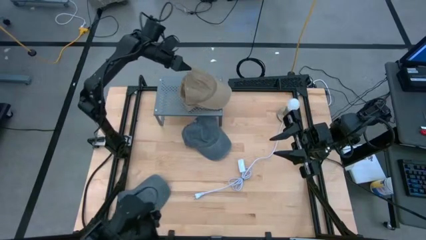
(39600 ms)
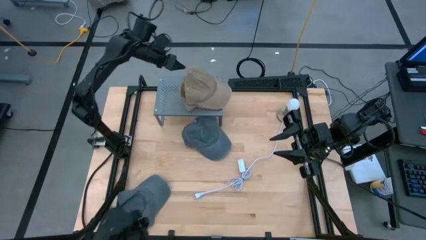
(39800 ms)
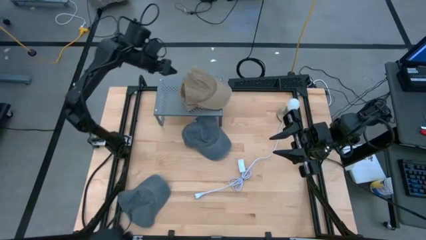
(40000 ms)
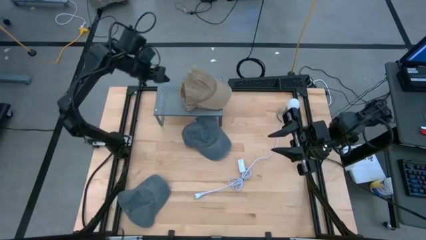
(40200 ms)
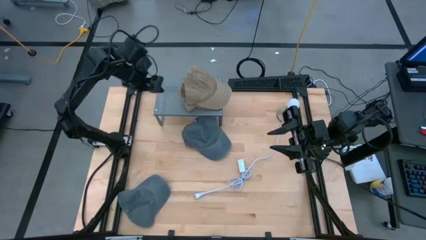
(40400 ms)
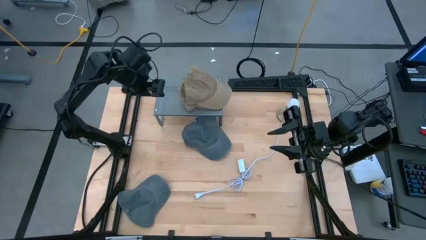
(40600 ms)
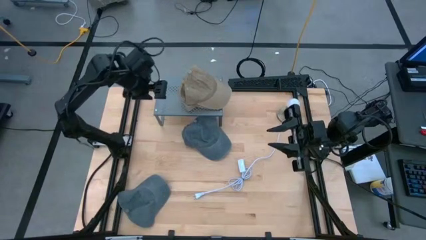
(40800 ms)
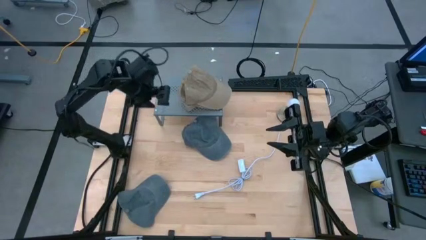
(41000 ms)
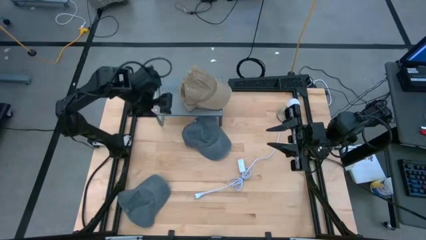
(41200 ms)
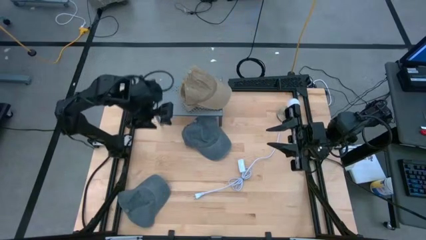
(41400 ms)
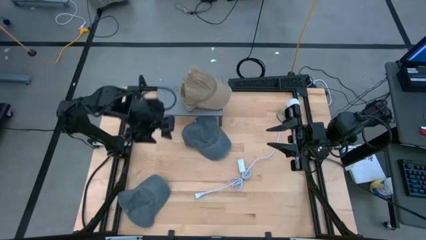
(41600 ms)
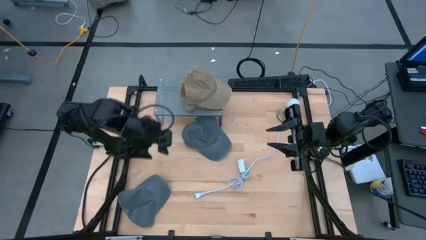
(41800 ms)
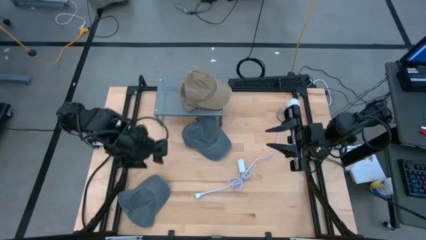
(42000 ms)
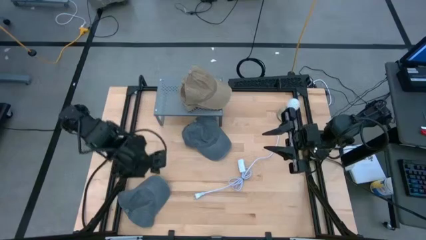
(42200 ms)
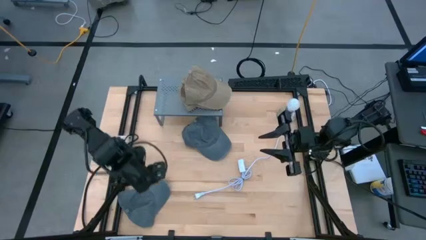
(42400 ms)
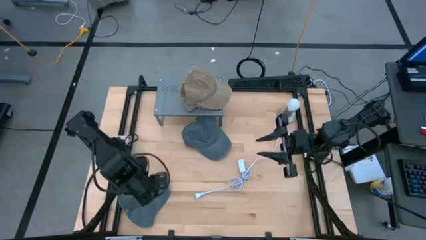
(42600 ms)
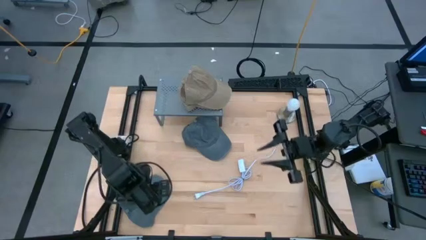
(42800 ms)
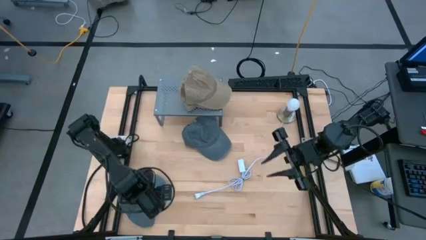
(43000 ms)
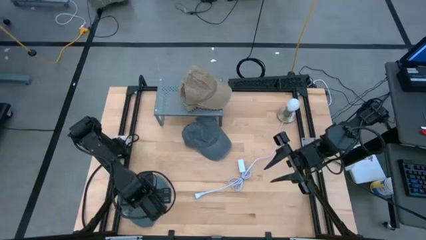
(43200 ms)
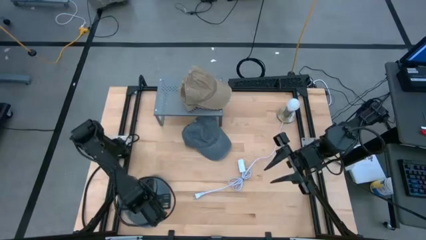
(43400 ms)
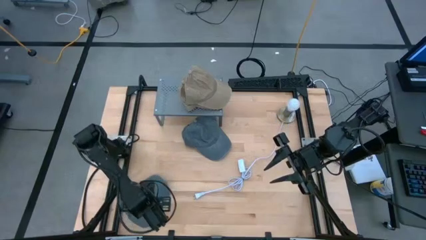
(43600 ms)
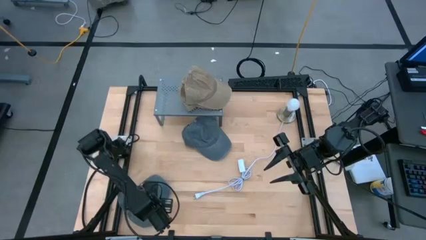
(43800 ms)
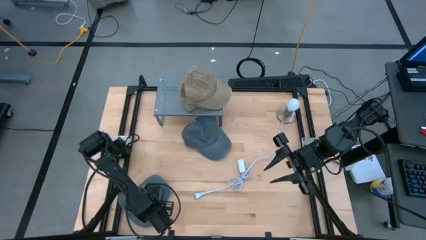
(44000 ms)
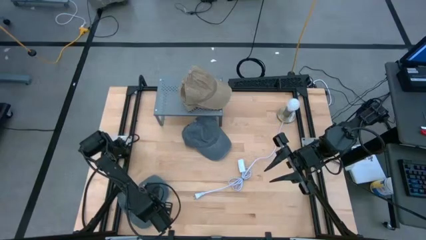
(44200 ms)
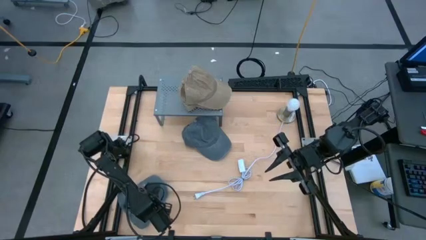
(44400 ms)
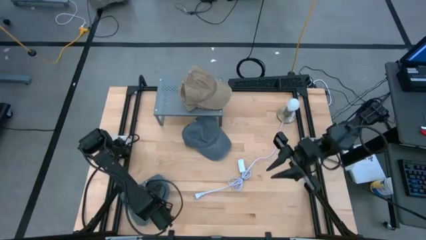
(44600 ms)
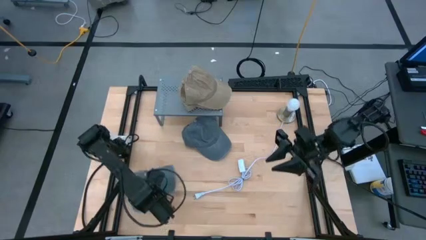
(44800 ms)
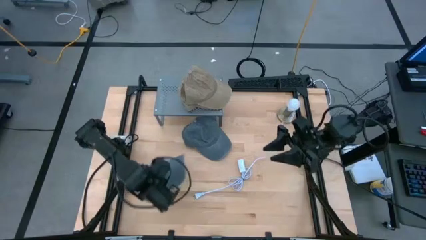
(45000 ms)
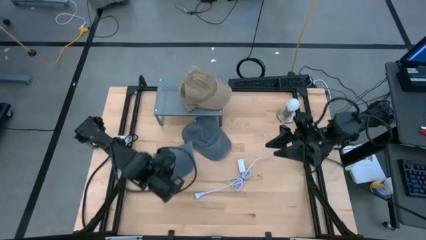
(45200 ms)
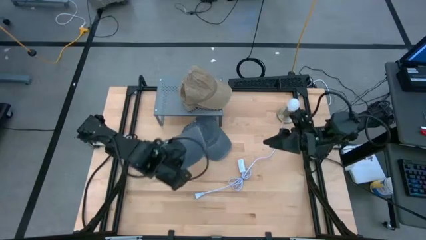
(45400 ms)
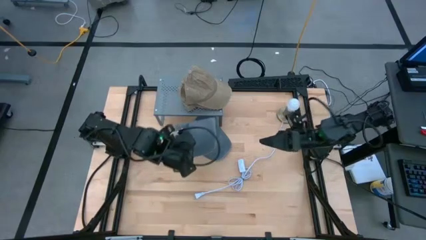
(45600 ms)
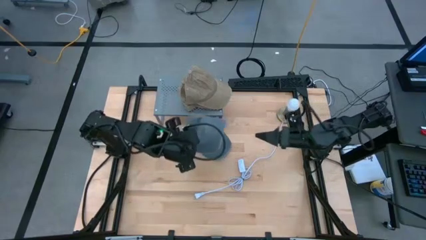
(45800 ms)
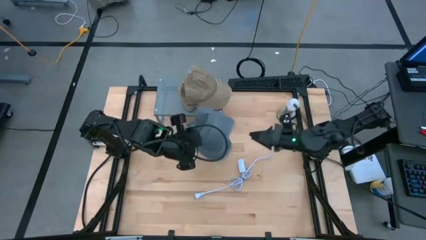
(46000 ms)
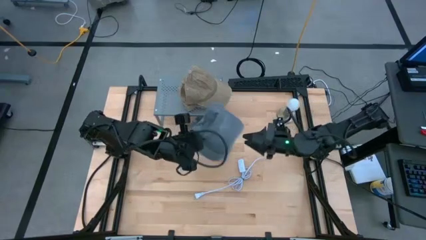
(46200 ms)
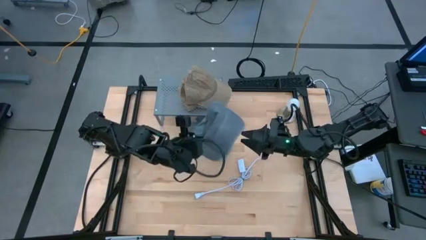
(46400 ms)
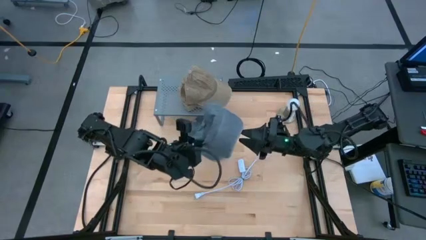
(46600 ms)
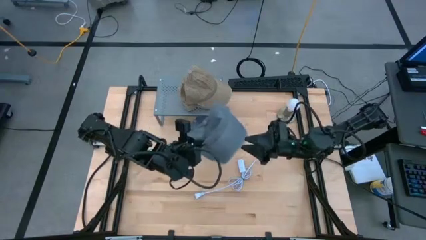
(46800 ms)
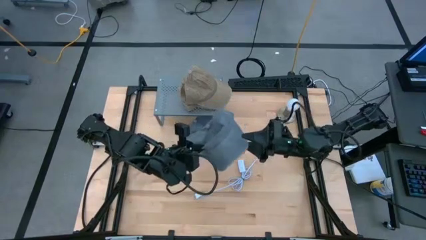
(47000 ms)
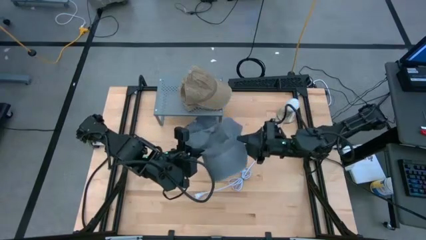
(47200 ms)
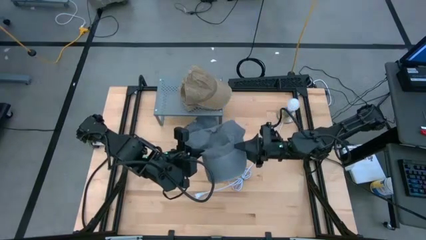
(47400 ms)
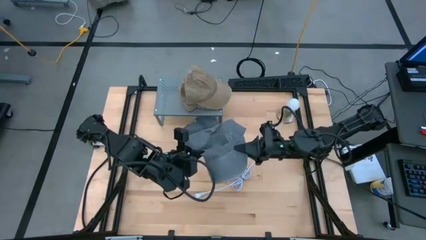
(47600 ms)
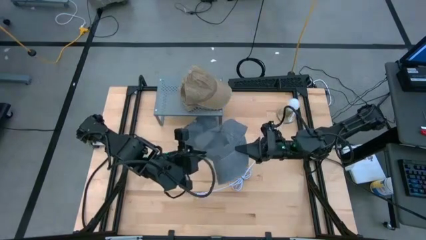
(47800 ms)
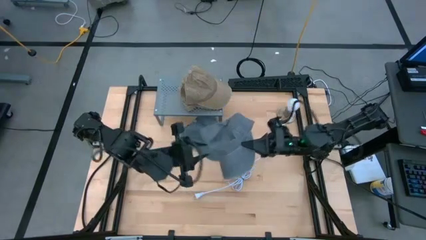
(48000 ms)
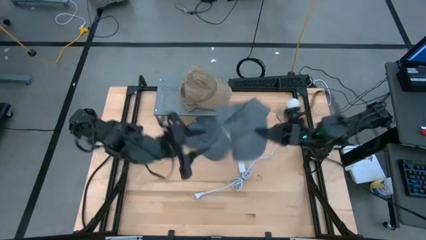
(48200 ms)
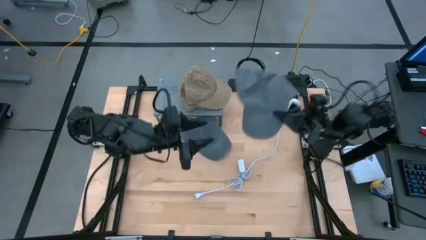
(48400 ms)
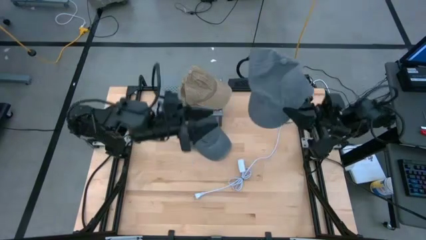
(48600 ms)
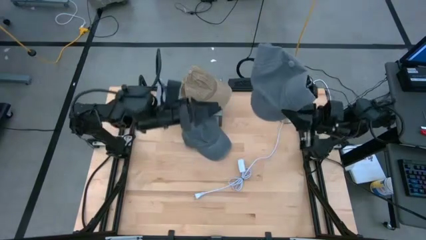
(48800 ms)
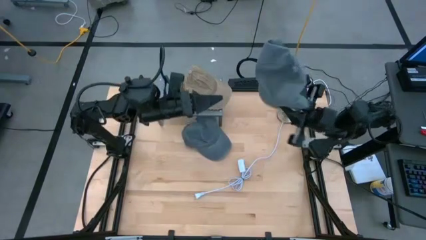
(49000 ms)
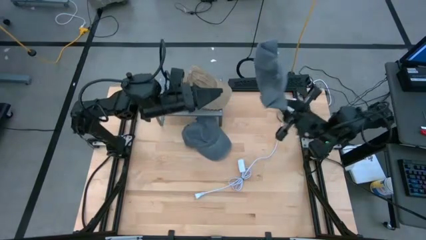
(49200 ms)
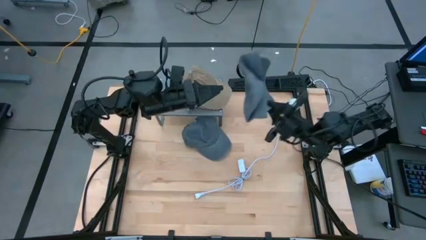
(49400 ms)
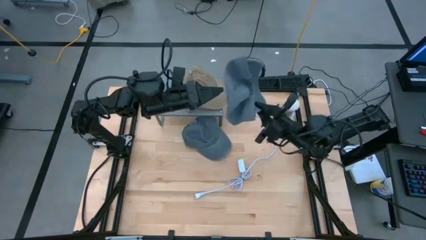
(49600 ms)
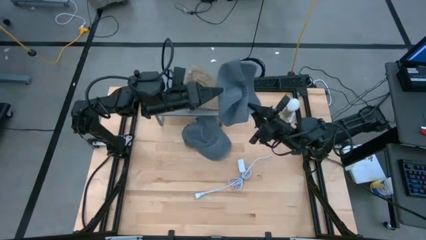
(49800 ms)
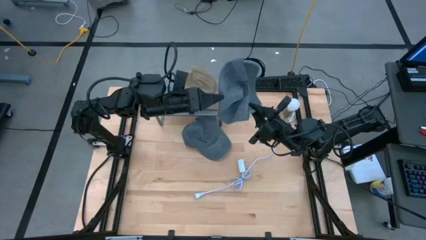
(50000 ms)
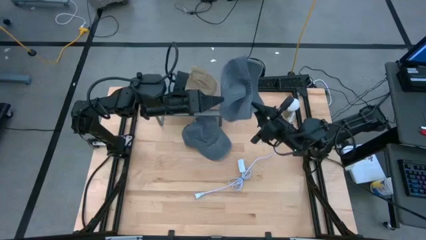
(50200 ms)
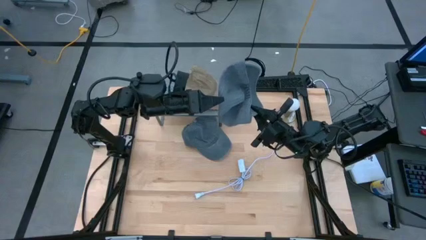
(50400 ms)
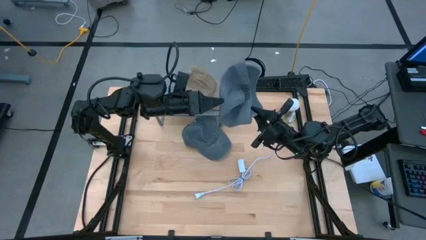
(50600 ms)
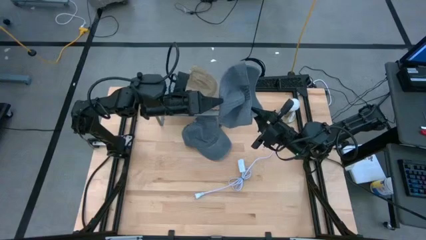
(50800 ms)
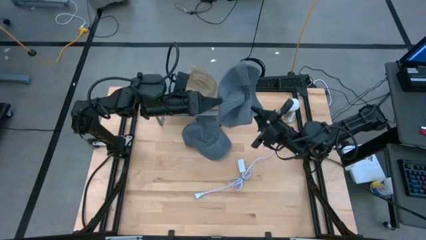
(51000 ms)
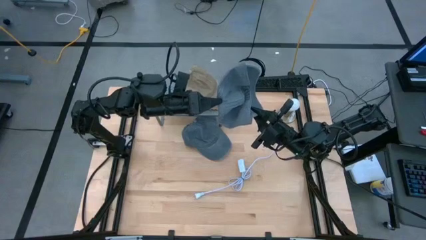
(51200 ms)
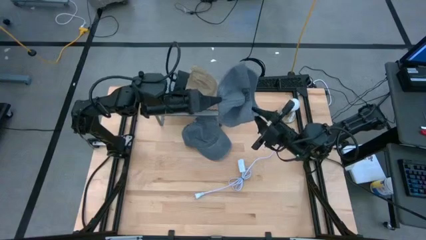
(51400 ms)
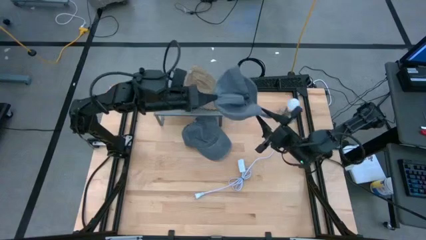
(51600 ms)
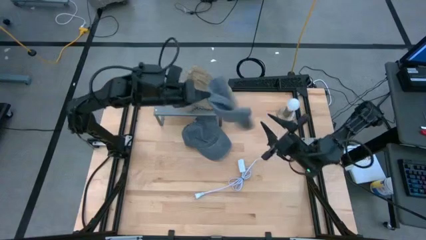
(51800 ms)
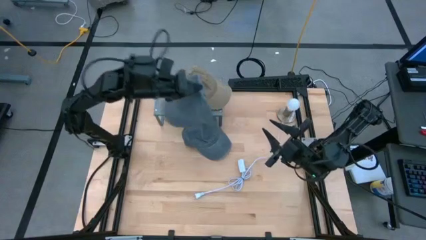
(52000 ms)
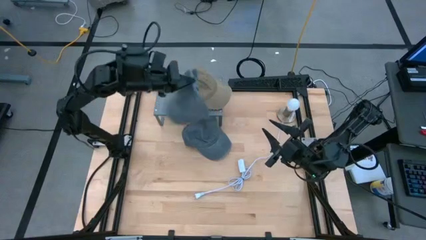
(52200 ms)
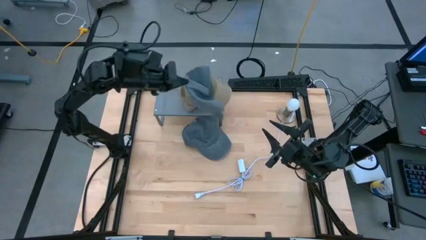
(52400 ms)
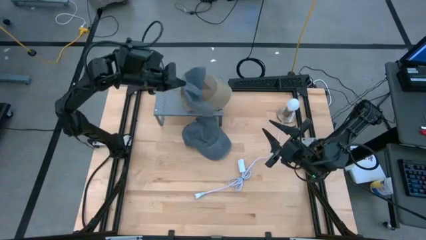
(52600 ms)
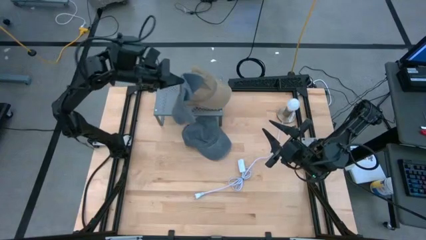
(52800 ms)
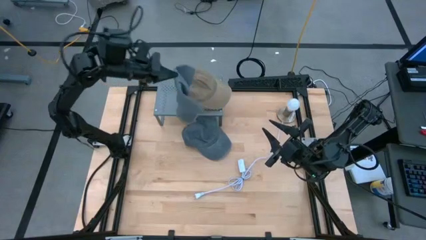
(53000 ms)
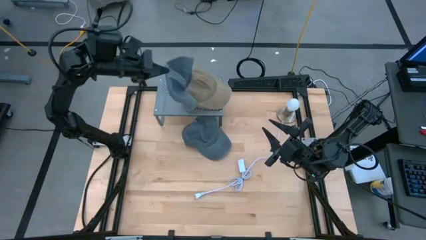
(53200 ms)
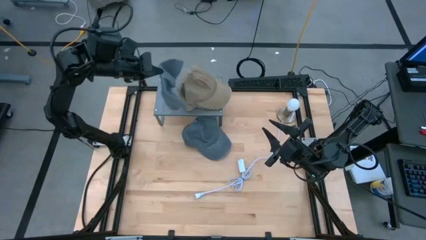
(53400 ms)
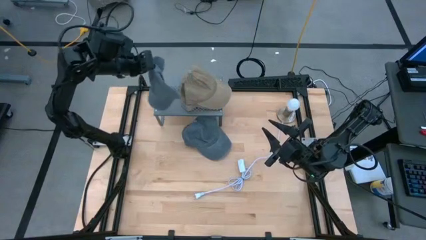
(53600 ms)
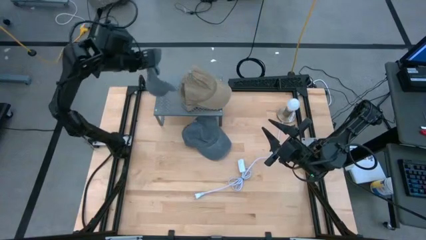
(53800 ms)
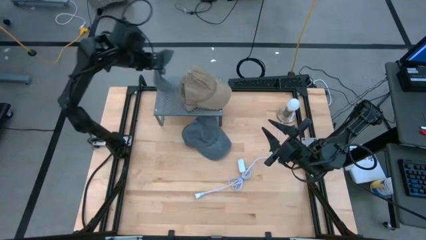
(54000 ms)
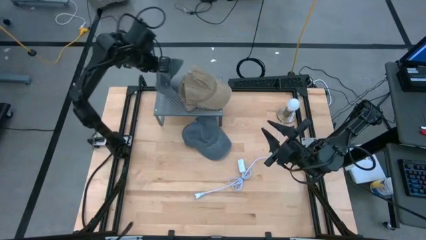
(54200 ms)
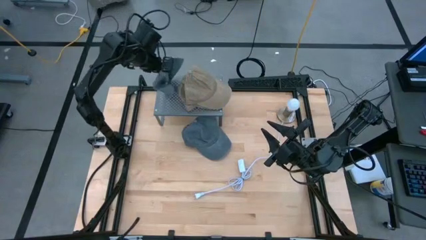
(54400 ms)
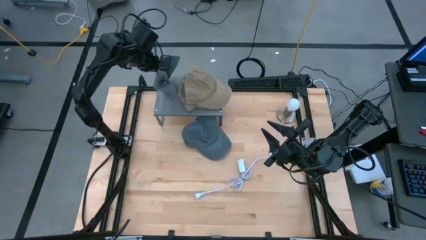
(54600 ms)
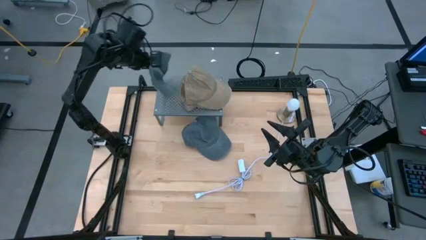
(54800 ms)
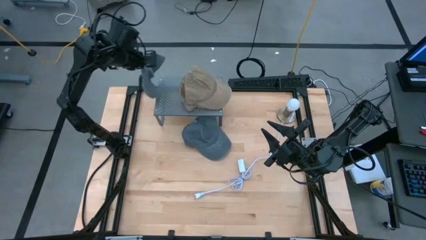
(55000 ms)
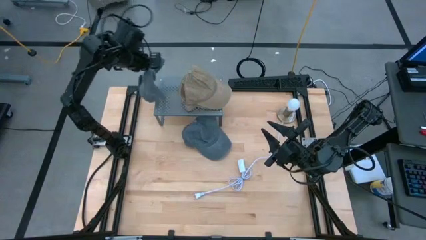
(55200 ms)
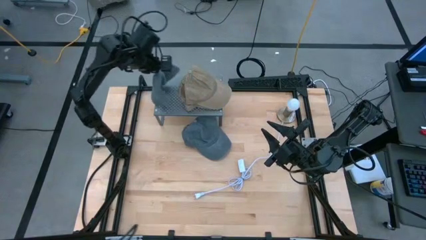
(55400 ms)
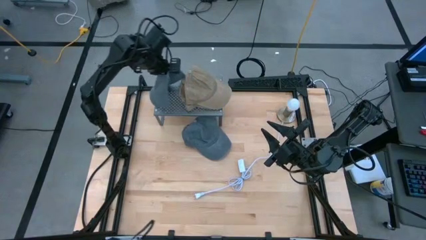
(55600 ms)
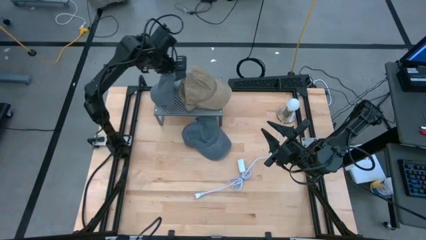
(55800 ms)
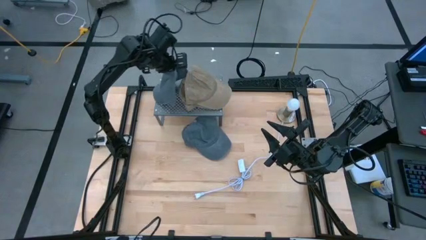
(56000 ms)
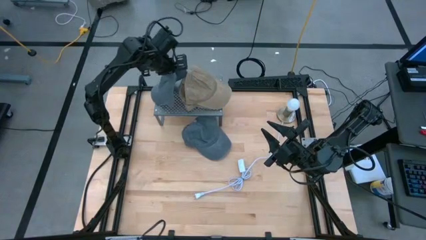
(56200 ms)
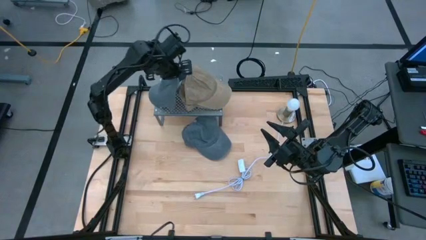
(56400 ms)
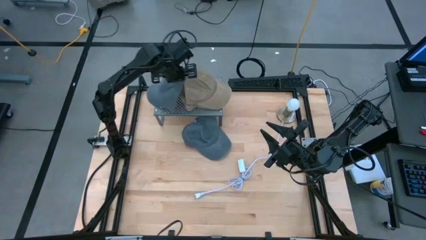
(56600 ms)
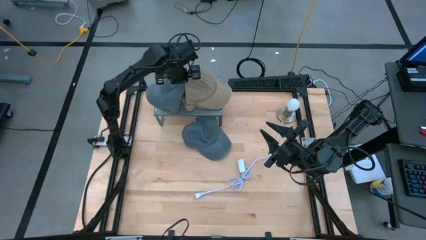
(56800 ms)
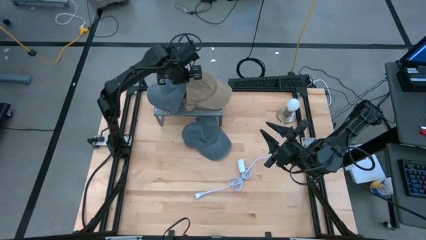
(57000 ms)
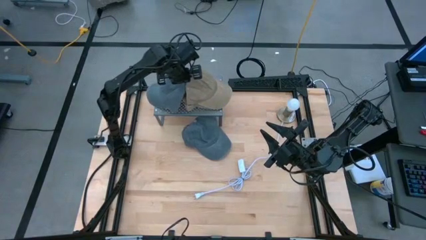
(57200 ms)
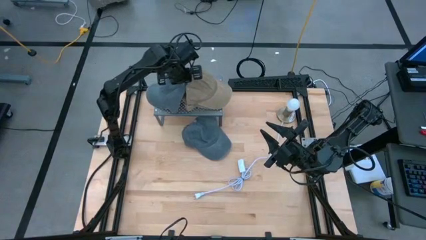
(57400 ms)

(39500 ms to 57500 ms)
Task: Pick & Place hat
Put the bottom gray cap on the shelf
